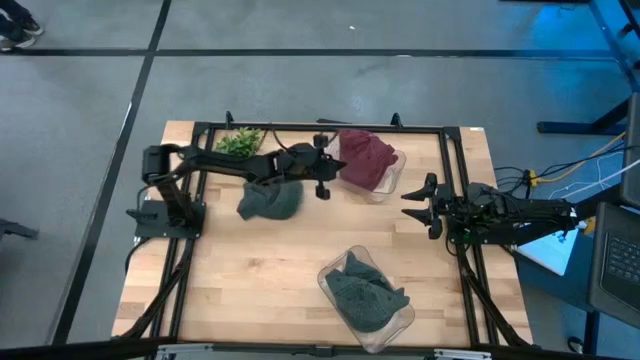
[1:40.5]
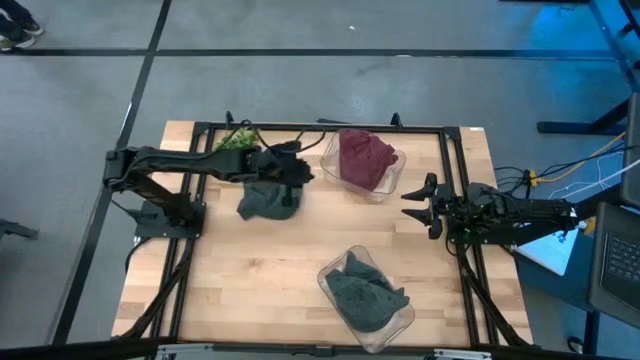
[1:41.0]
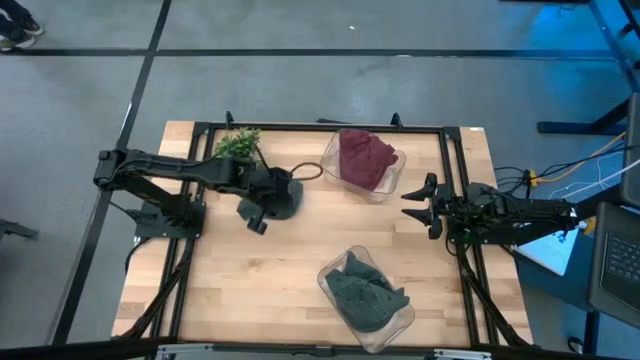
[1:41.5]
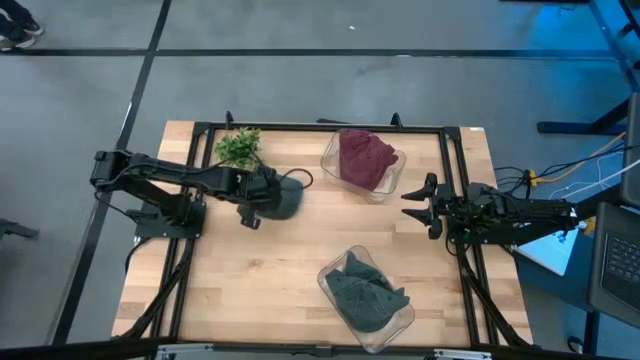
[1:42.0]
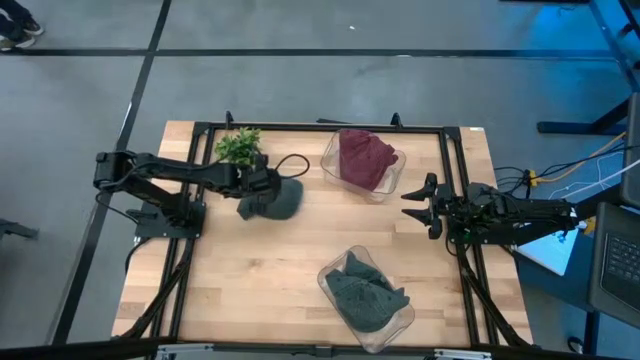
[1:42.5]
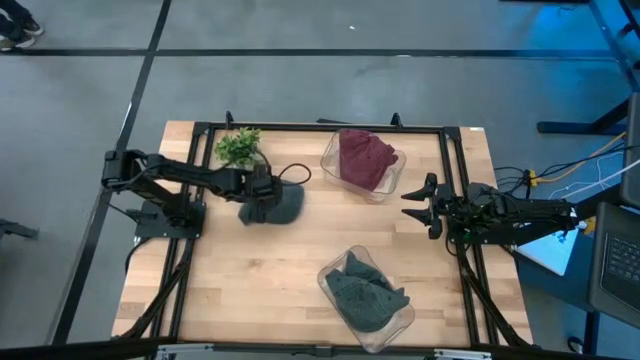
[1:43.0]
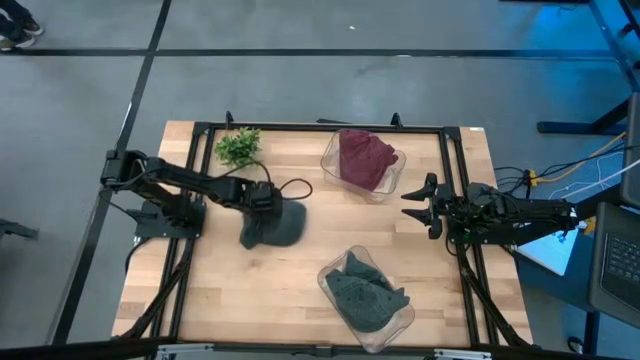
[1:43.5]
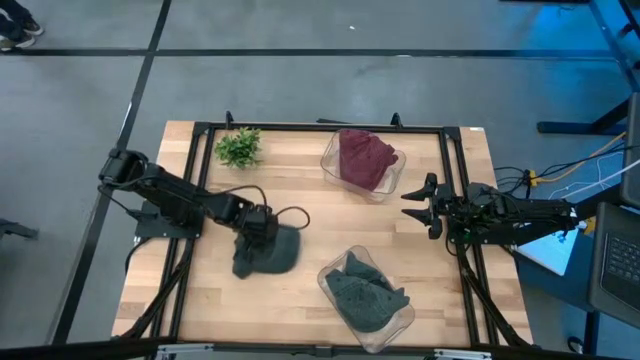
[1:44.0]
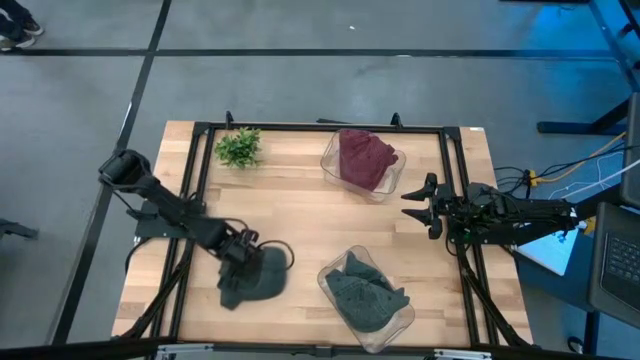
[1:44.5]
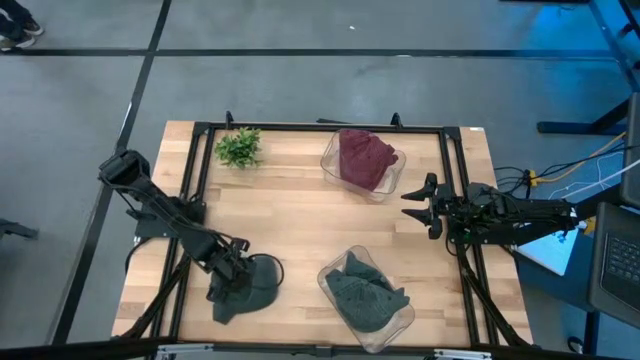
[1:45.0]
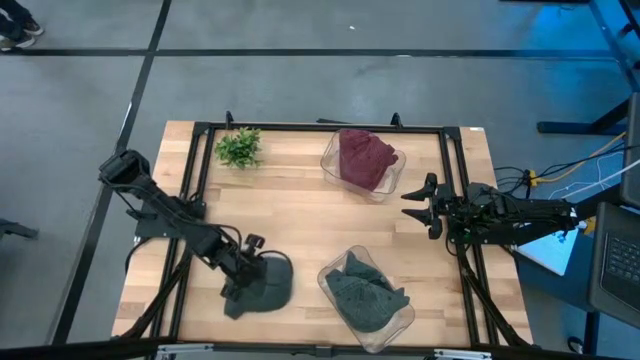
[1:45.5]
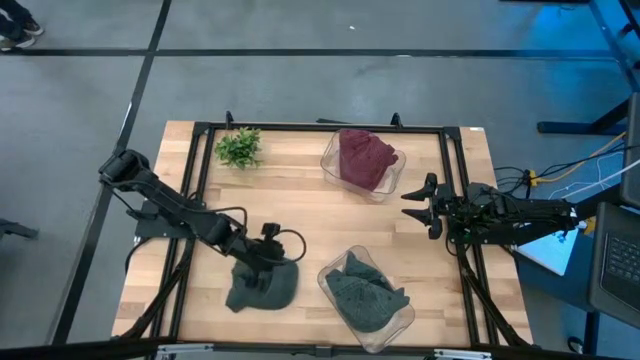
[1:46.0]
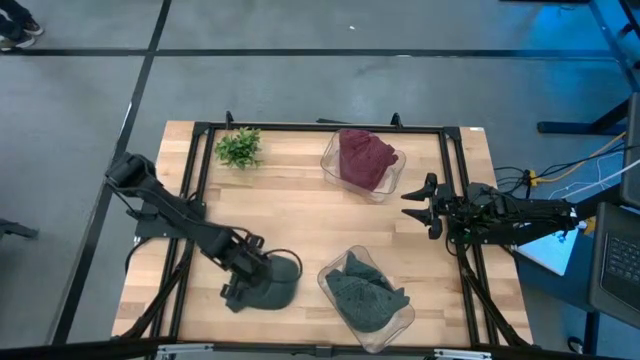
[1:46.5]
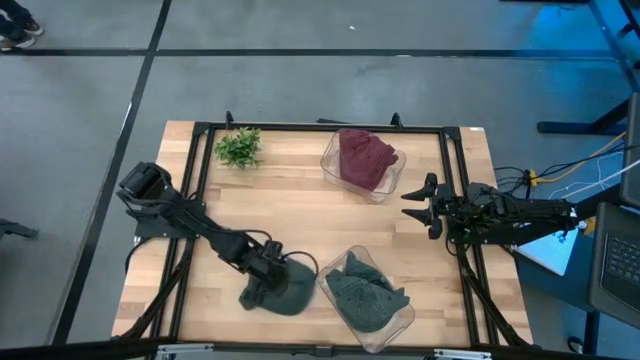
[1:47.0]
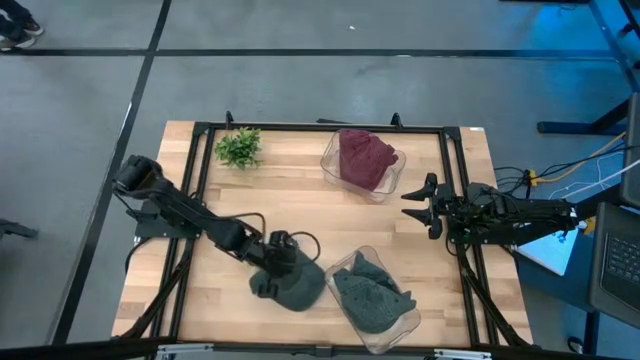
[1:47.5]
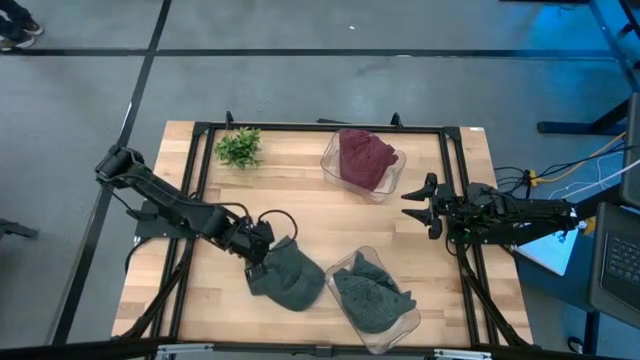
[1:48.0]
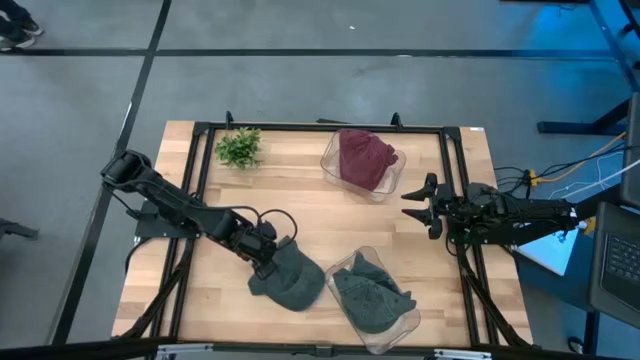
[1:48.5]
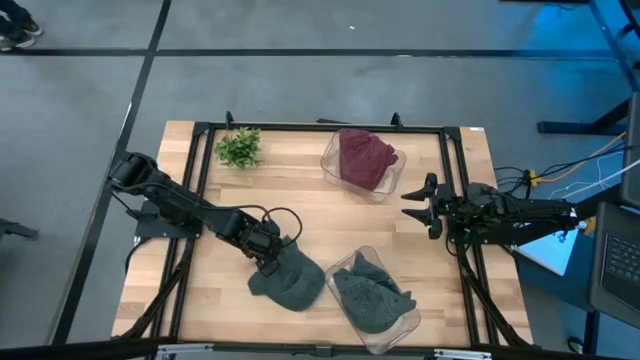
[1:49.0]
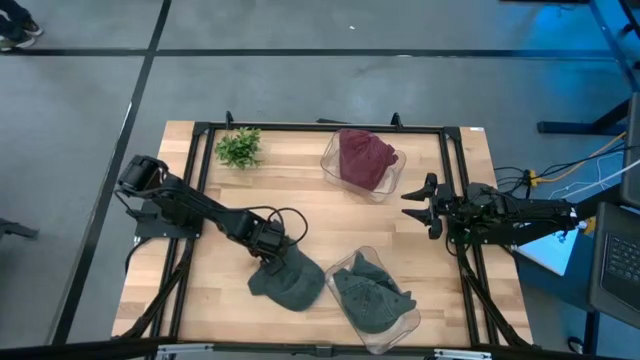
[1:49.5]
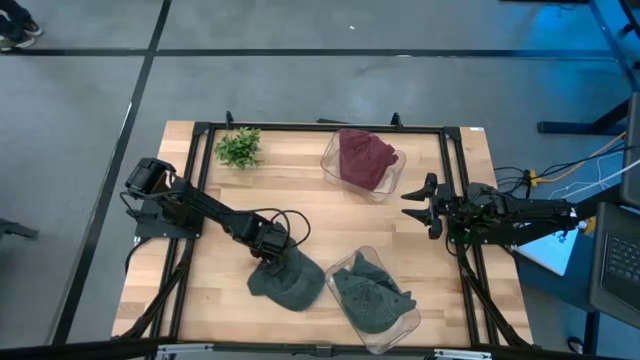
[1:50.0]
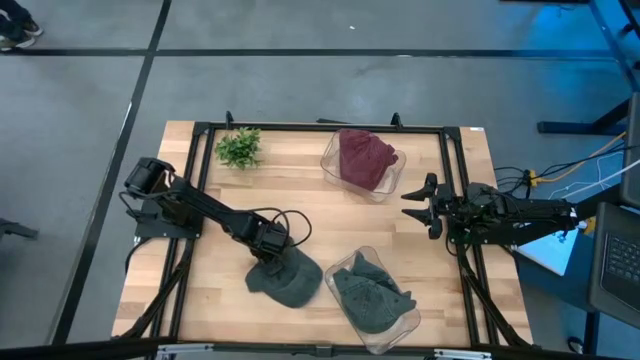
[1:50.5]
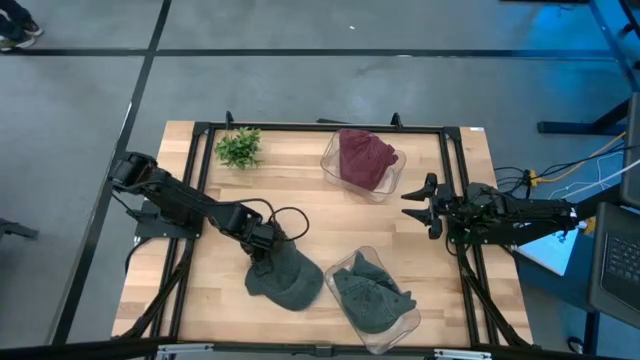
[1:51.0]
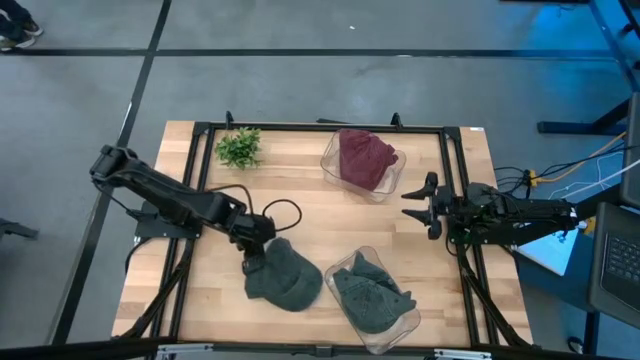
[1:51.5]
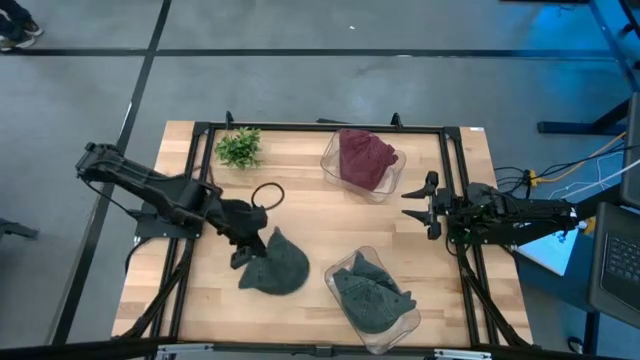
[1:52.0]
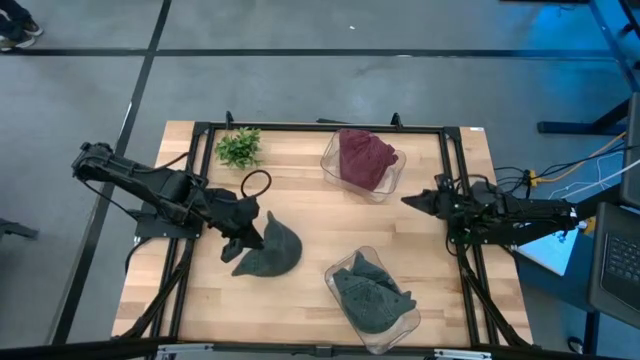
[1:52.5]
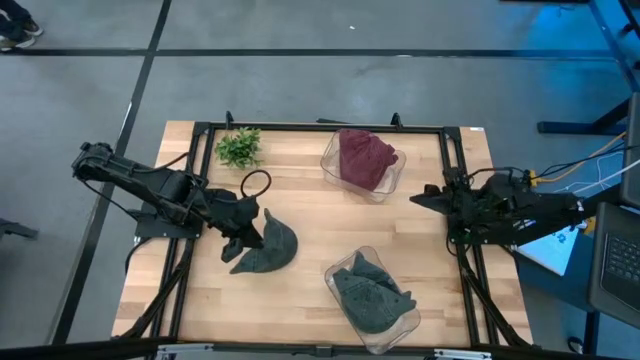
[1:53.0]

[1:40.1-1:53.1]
Task: Pick & Place hat
Put the black cap into the bottom transparent bin

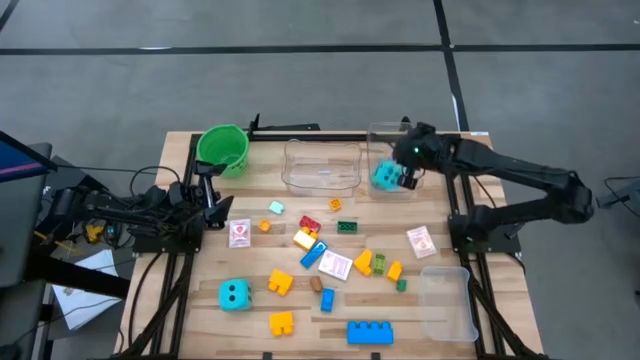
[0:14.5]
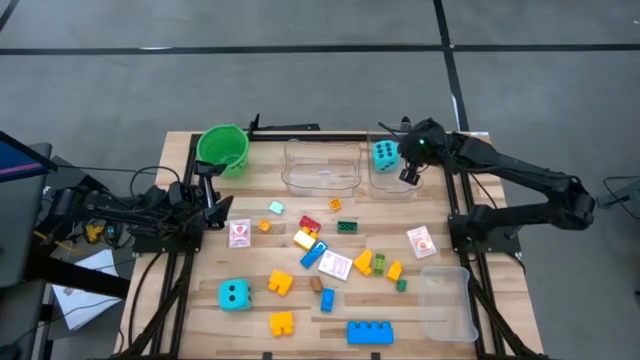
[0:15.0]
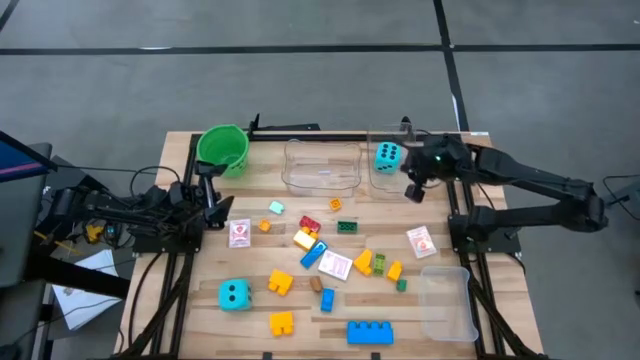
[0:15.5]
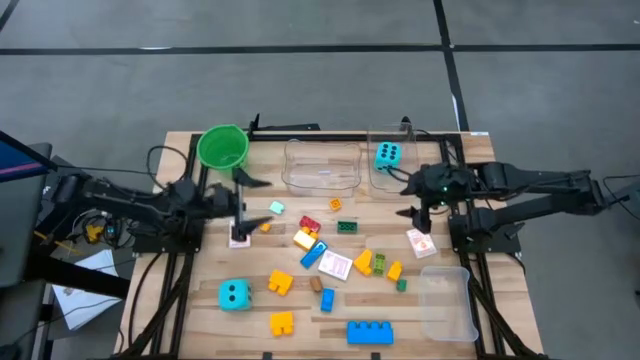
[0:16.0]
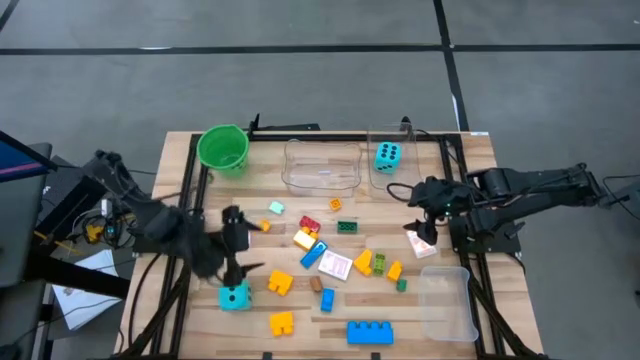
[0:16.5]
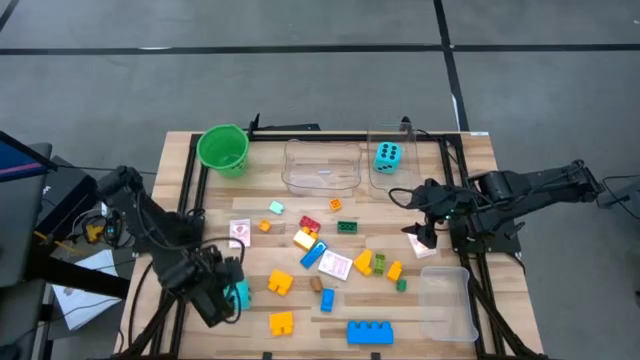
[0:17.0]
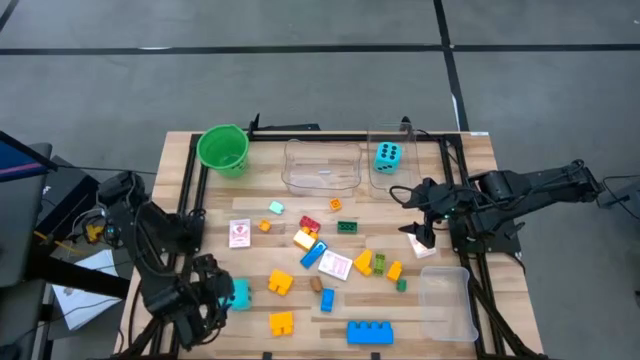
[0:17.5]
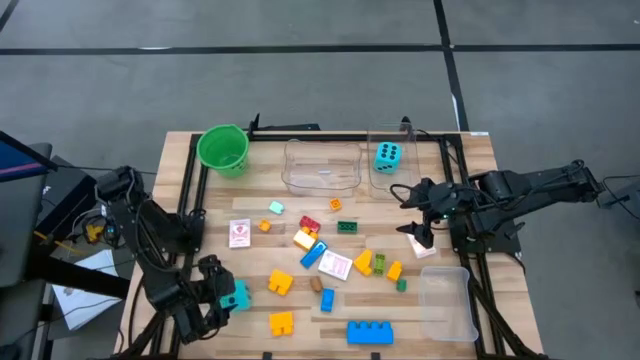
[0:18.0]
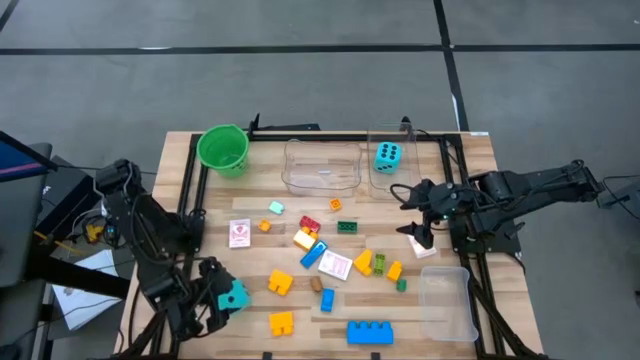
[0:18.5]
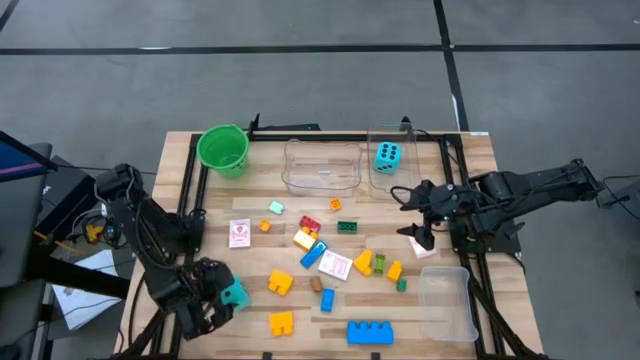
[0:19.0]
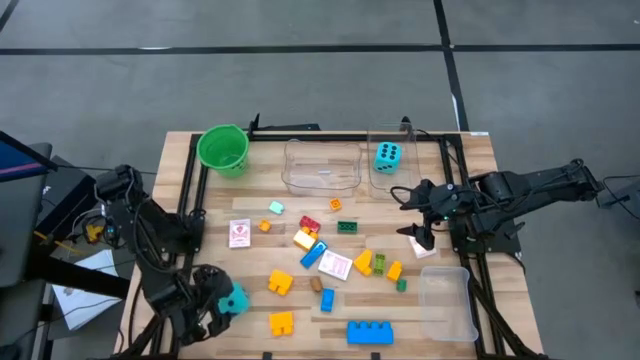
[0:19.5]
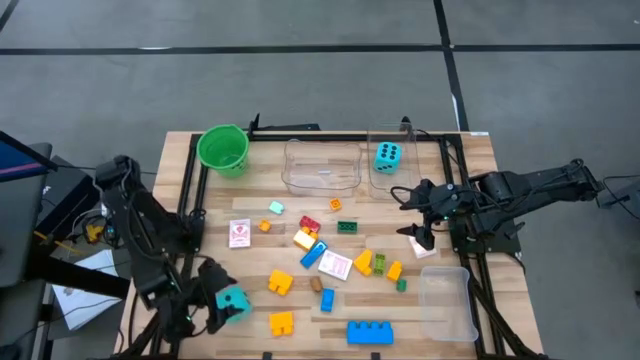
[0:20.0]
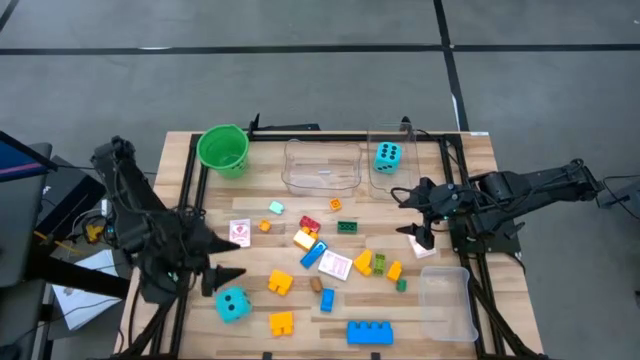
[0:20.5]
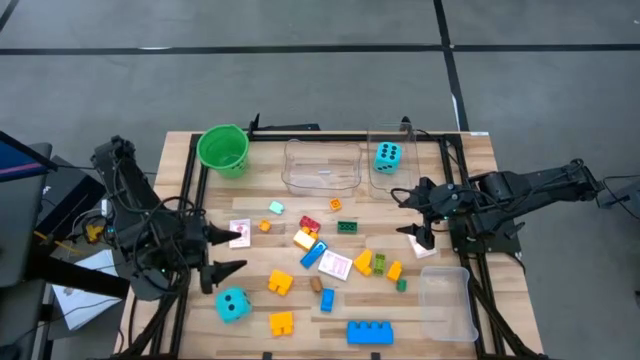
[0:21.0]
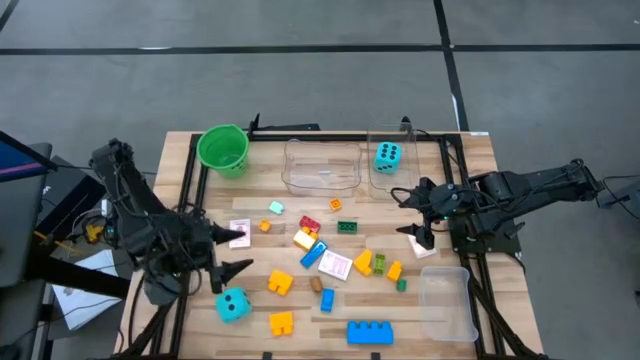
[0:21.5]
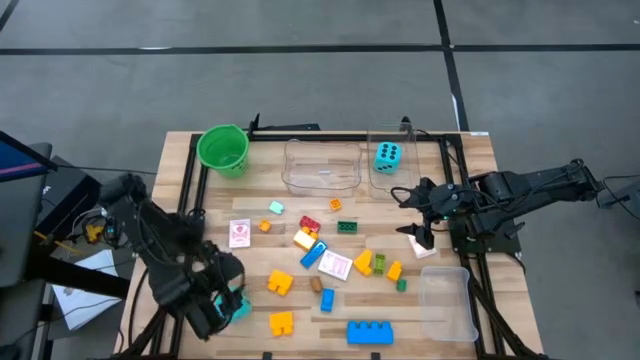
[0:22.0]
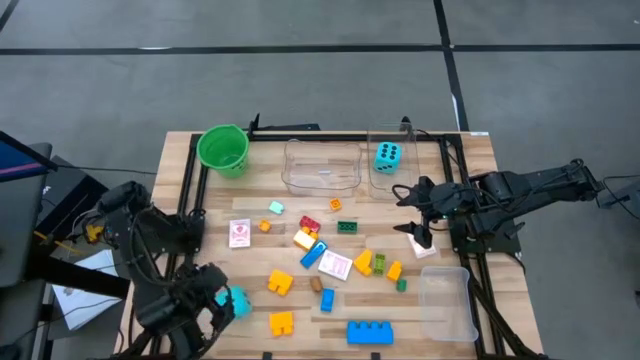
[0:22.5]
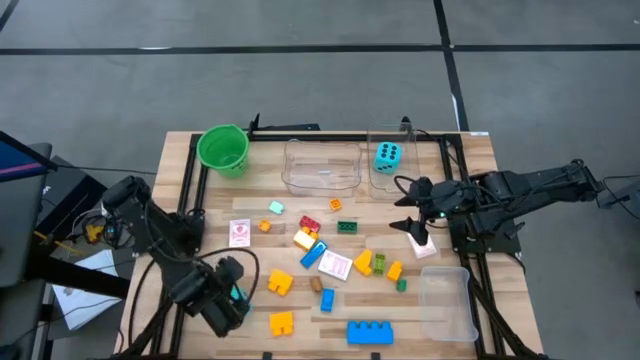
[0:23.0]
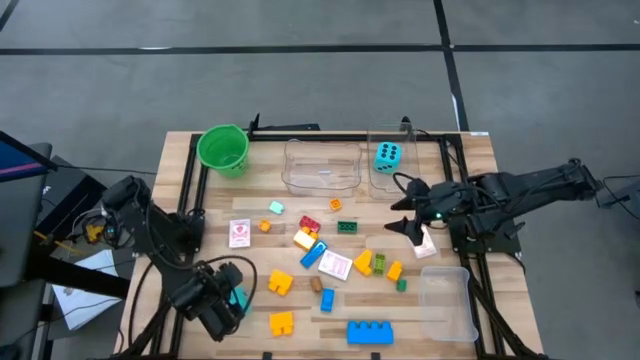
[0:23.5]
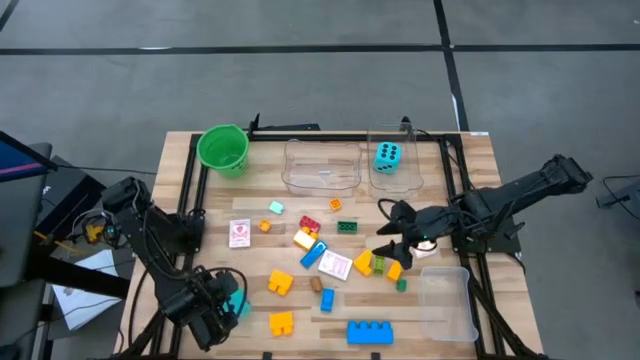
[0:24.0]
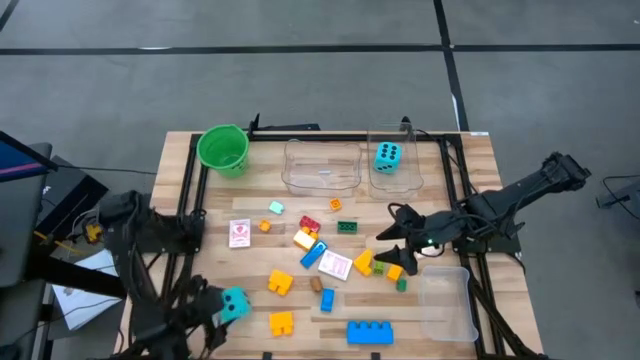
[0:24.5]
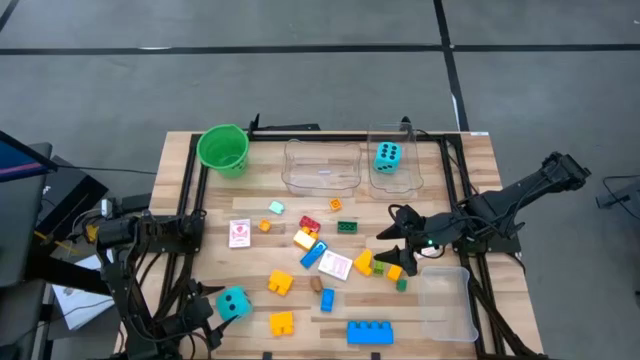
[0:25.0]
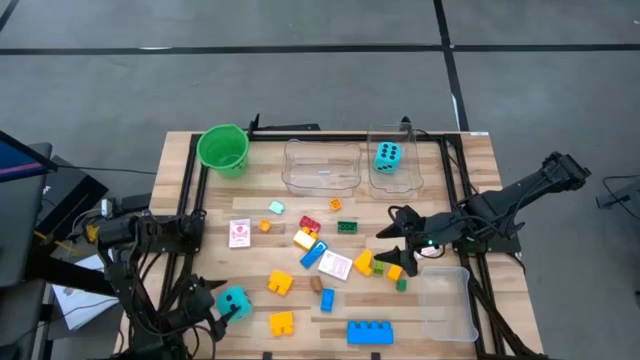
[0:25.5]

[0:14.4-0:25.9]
Task: Pick & Place Toys
Put the blue dice into the right transparent bin
